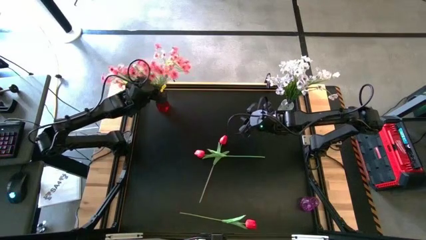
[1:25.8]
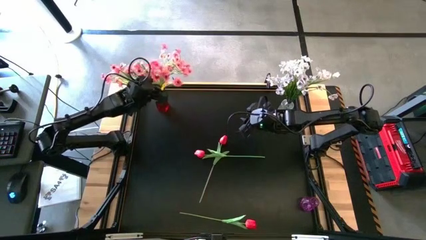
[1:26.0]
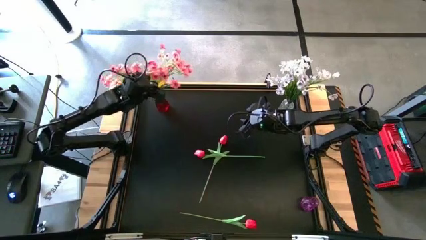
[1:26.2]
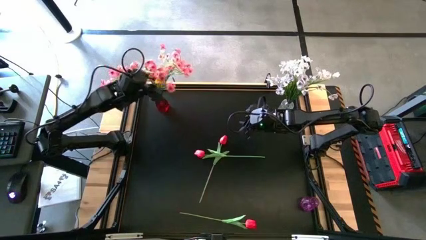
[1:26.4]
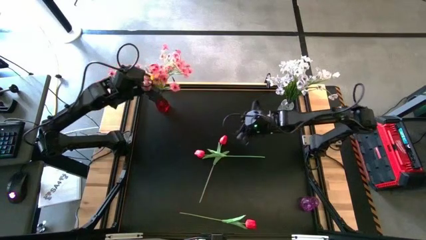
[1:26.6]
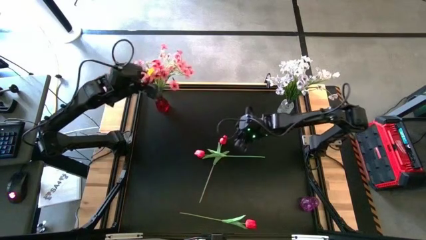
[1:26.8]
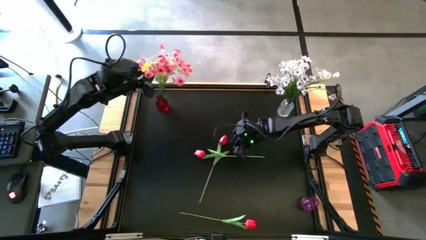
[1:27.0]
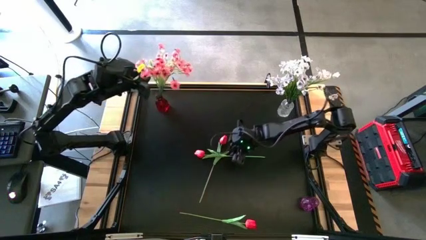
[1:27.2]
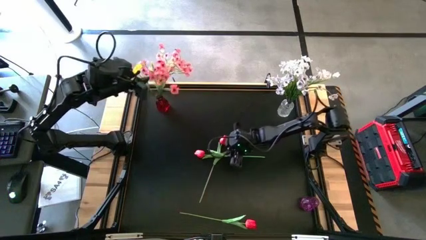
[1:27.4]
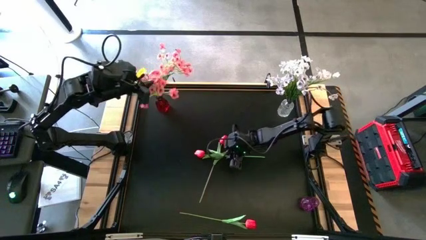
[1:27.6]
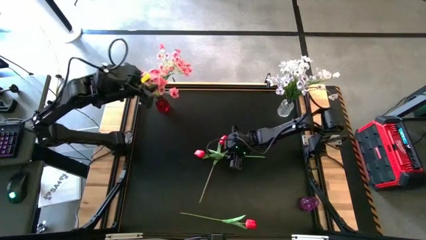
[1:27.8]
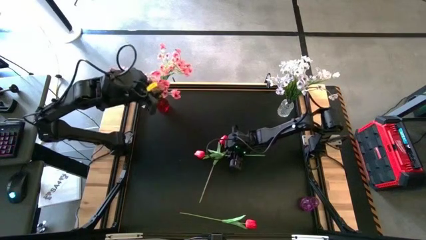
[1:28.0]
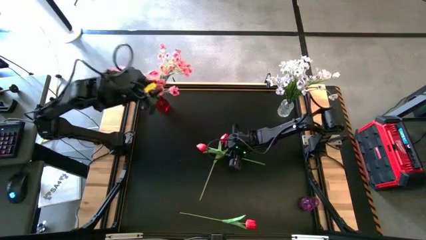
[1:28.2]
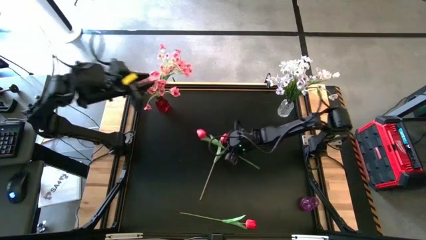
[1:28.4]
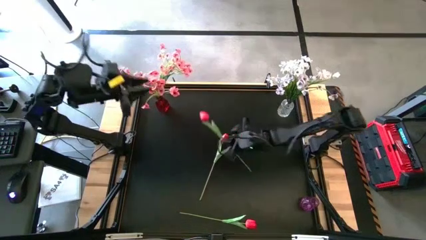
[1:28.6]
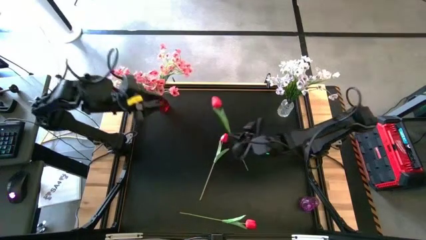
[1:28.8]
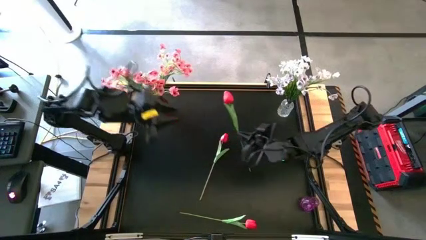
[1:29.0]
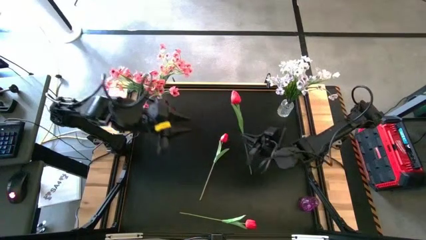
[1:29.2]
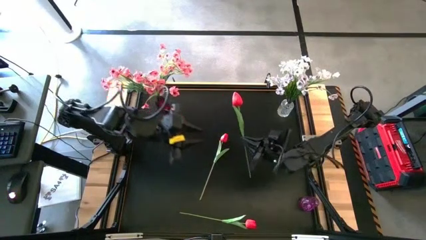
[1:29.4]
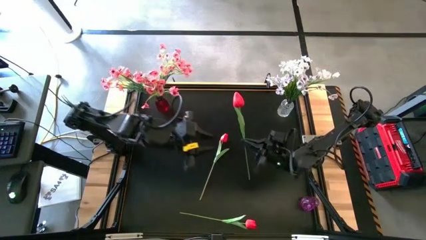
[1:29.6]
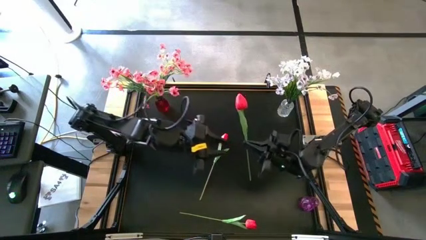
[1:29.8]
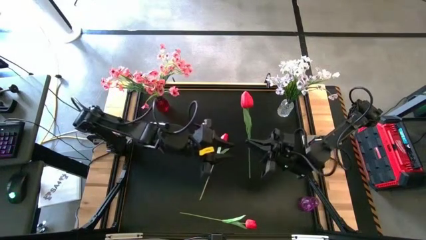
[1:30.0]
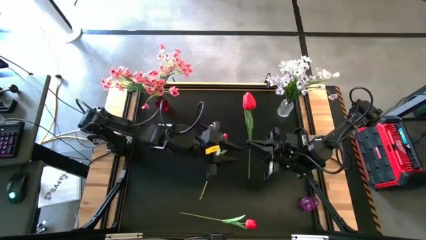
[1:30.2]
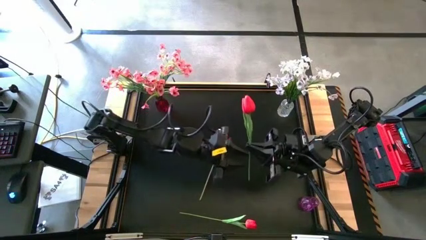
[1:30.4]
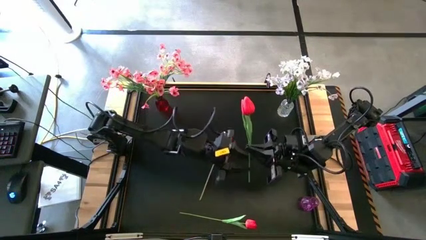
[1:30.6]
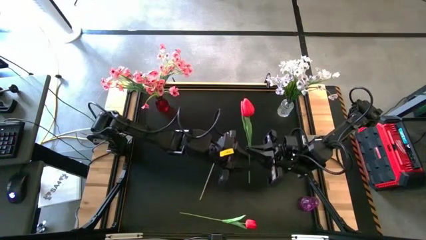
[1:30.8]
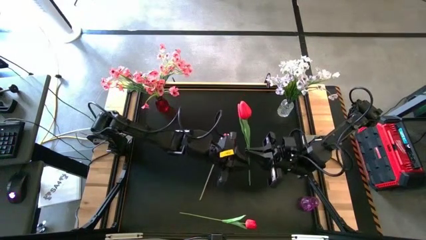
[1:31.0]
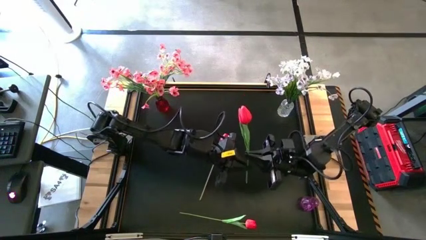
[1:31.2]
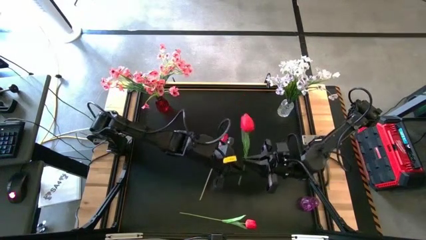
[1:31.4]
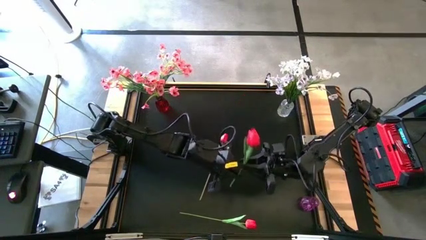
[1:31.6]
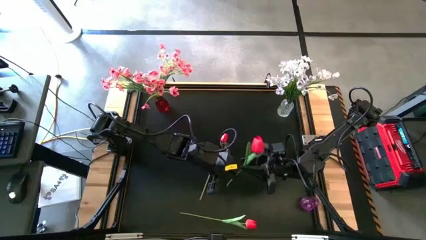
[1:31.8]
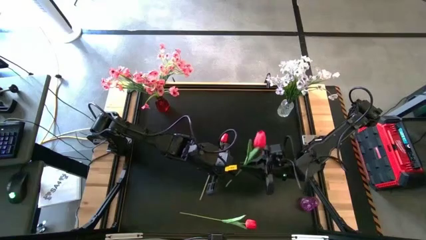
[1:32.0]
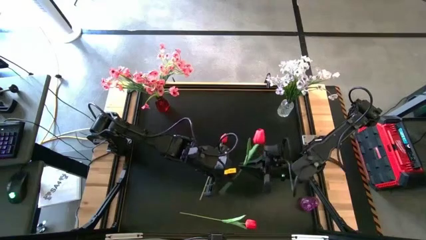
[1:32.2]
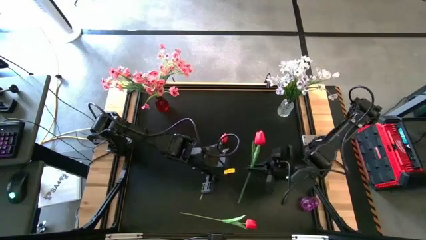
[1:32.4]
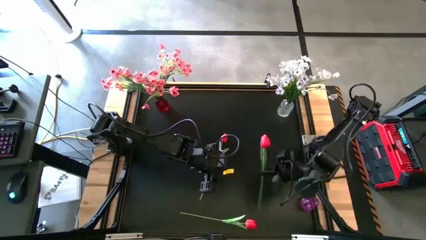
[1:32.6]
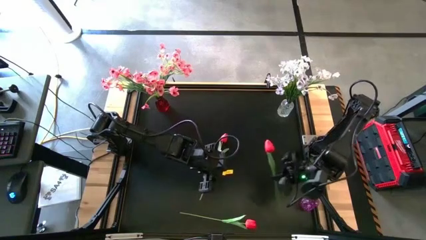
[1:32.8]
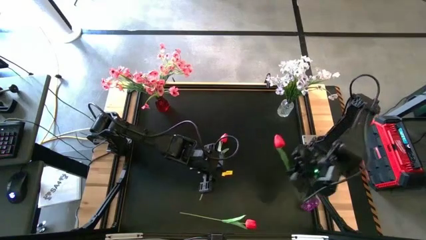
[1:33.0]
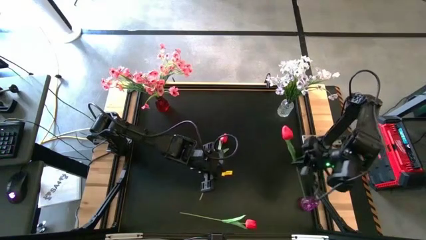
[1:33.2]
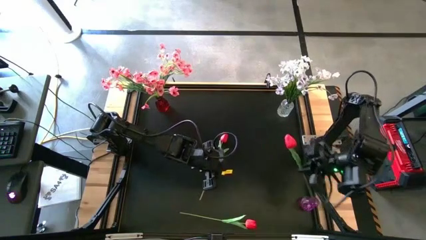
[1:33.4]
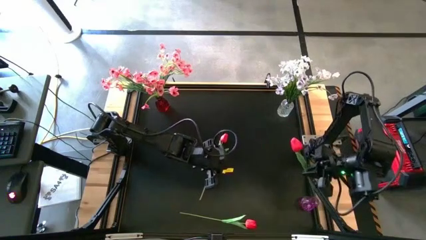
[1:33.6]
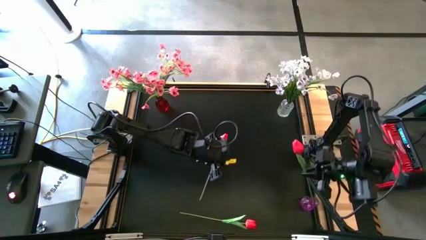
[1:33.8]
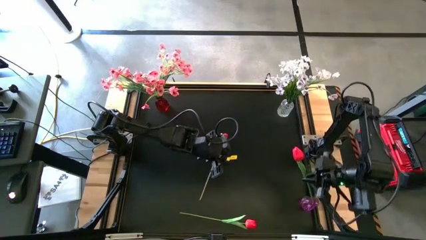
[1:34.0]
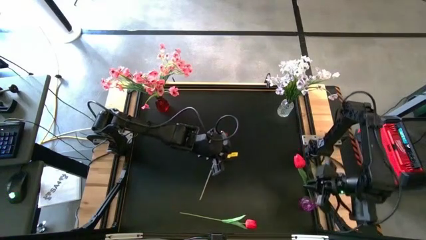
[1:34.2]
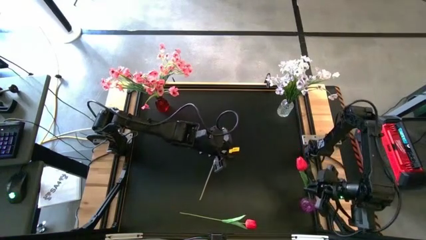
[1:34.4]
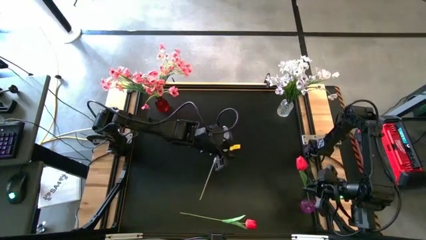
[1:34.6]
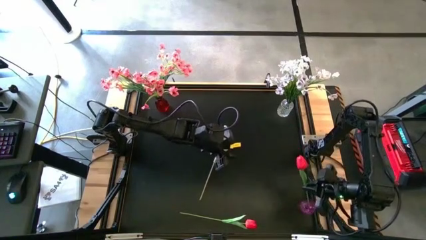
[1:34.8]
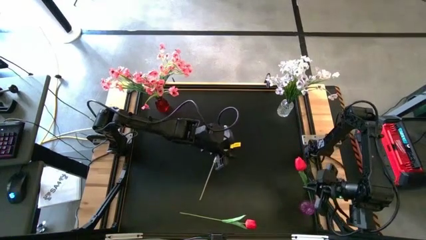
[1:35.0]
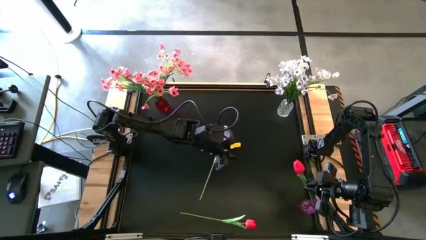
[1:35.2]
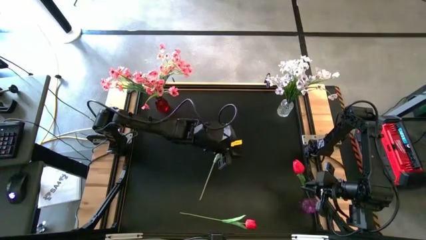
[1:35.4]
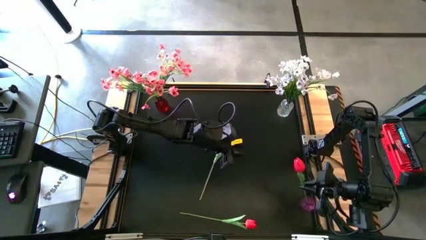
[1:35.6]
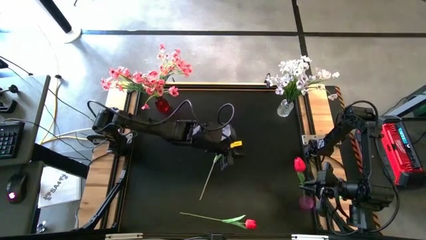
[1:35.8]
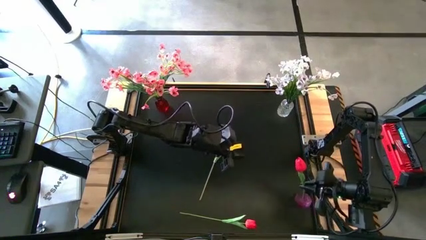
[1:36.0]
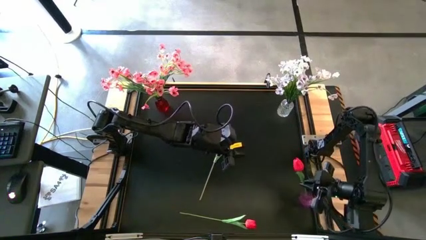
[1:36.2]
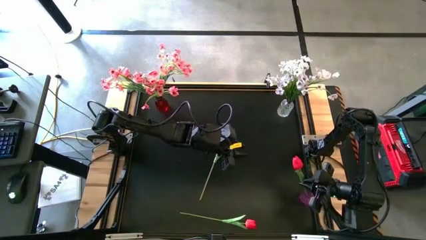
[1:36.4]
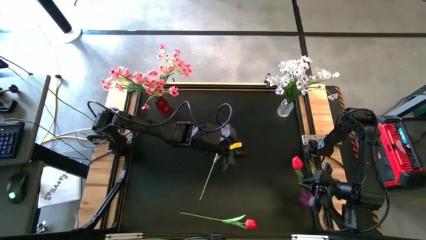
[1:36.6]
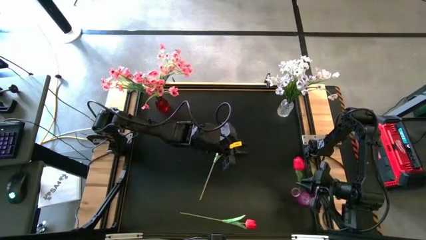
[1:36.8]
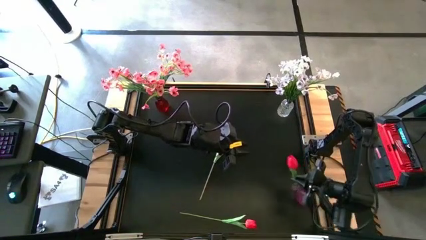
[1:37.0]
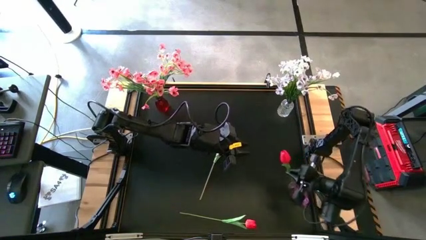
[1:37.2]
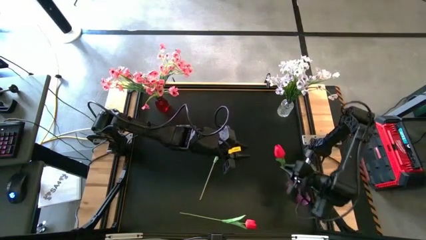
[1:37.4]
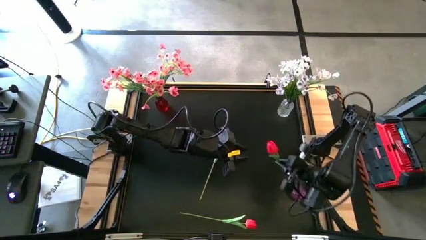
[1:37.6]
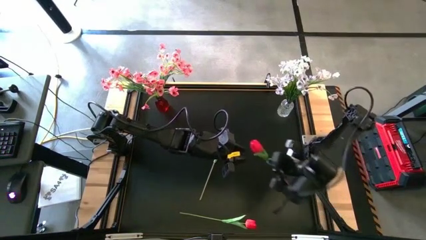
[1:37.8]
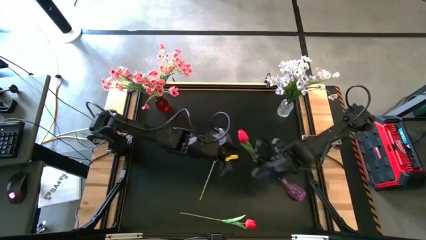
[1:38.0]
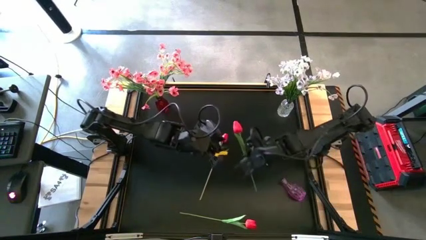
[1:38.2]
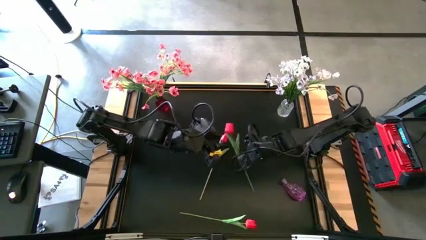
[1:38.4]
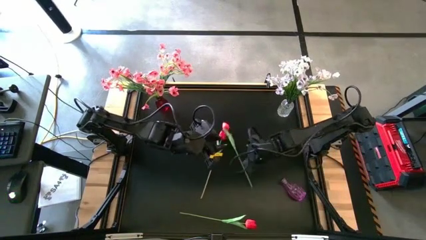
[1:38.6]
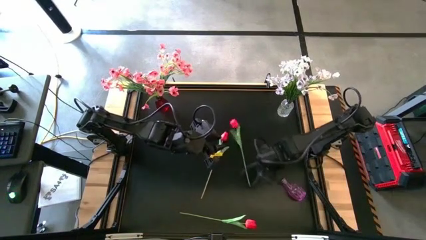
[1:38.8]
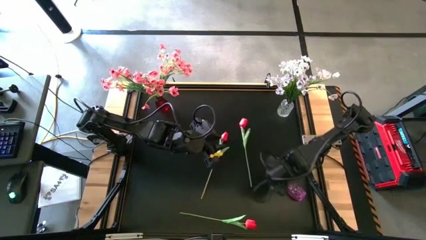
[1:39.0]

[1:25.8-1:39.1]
Task: Sort flowers into vase by color
Put the middle red tulip into the purple flower vase

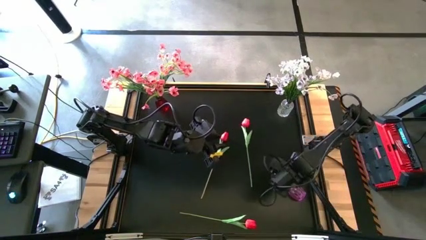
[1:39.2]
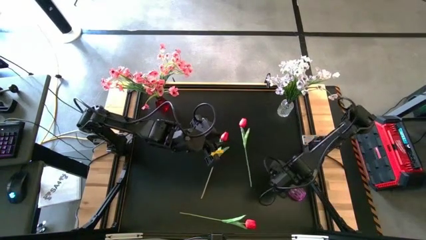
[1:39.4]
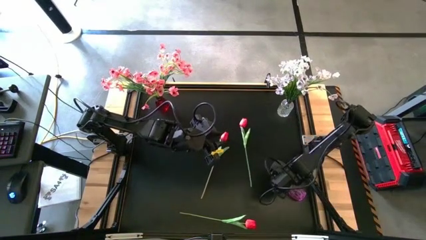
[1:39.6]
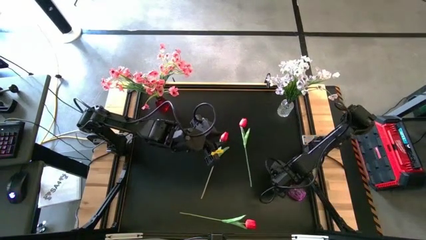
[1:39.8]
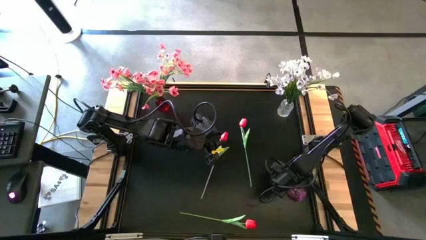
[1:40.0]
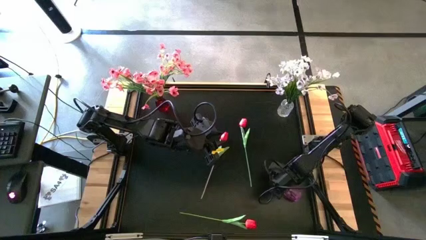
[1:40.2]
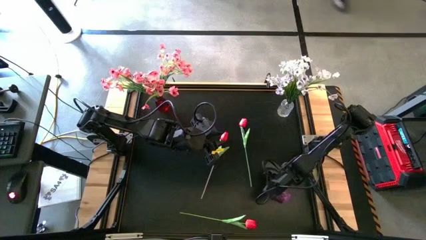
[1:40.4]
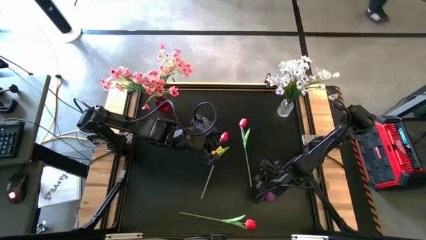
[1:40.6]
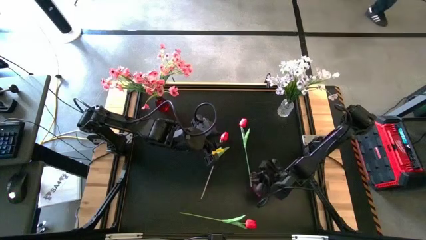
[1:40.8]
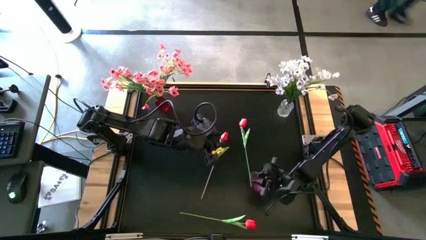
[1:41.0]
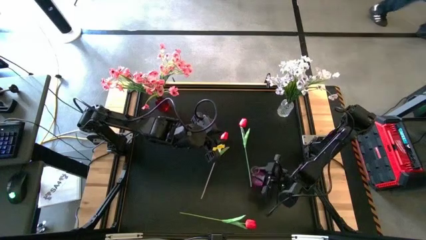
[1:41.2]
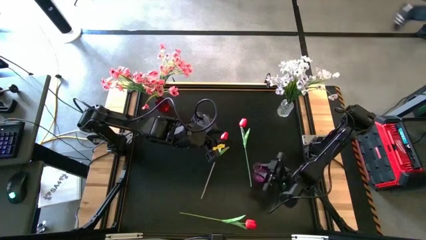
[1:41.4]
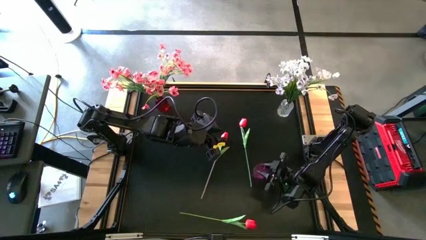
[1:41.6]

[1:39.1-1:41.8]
Adjust the purple flower vase
